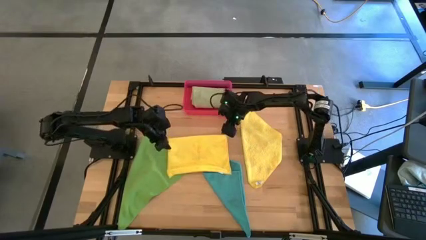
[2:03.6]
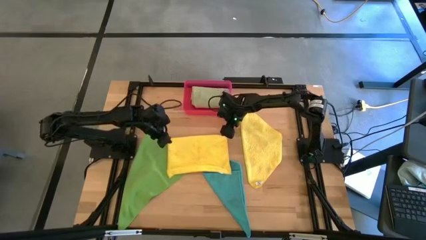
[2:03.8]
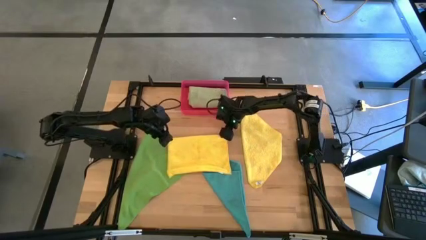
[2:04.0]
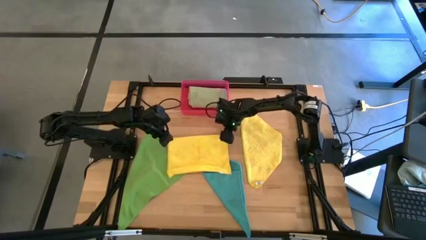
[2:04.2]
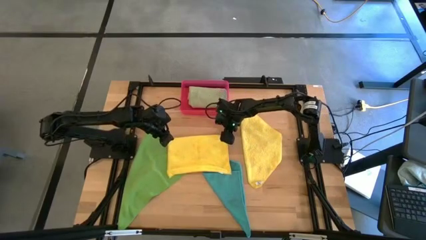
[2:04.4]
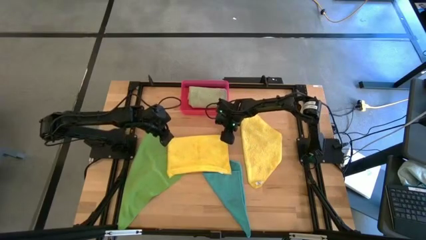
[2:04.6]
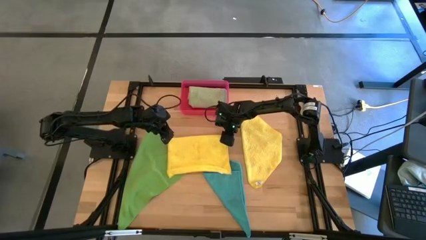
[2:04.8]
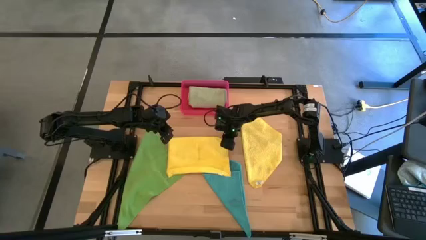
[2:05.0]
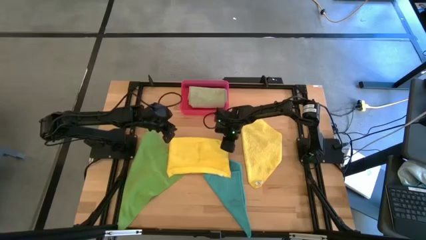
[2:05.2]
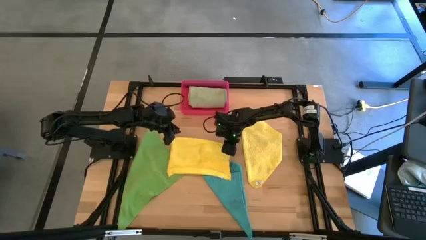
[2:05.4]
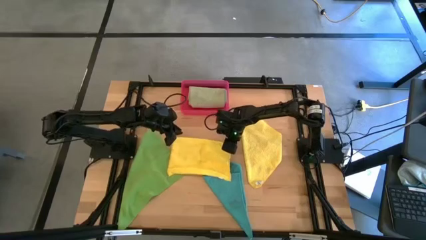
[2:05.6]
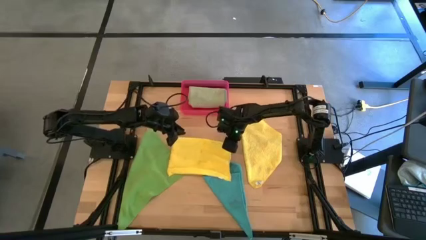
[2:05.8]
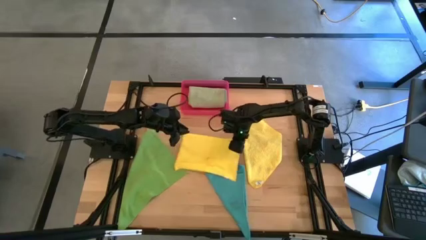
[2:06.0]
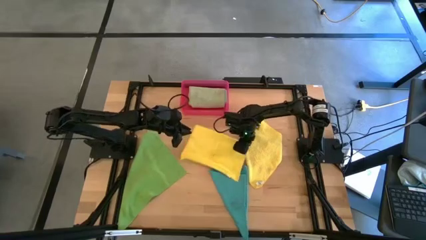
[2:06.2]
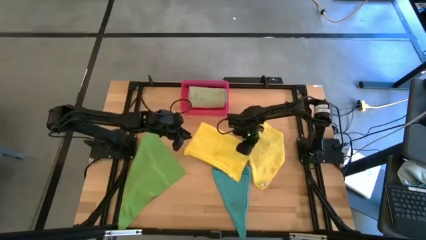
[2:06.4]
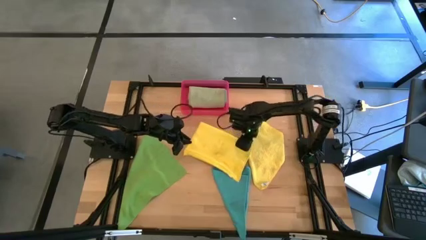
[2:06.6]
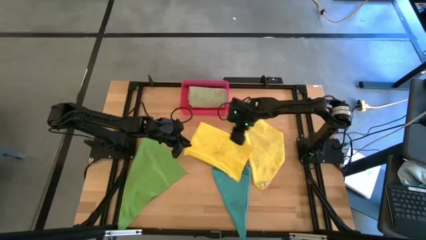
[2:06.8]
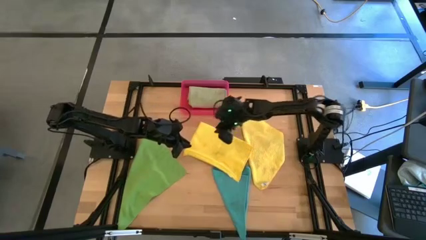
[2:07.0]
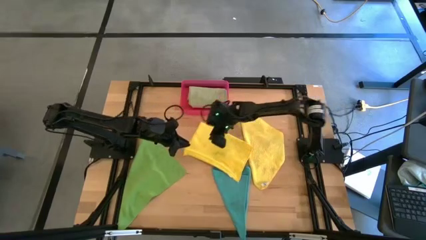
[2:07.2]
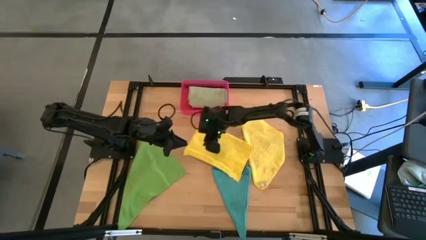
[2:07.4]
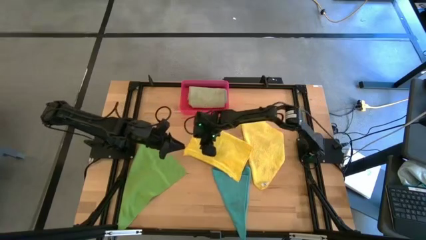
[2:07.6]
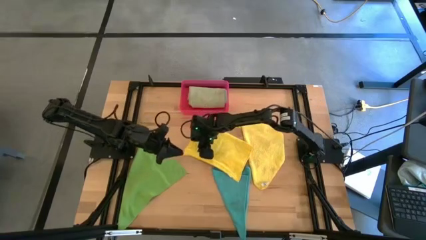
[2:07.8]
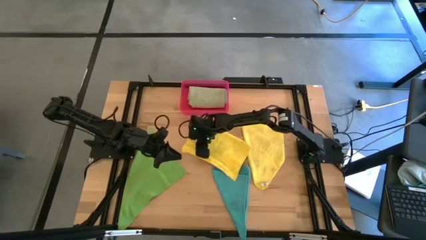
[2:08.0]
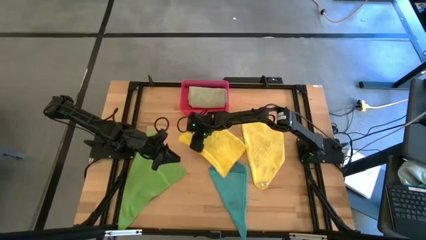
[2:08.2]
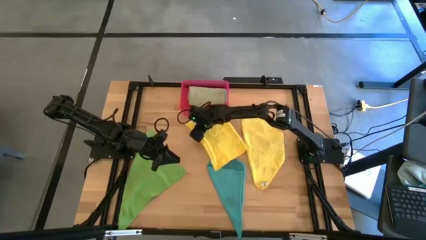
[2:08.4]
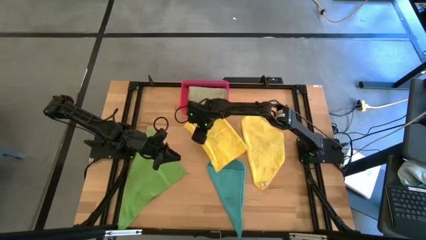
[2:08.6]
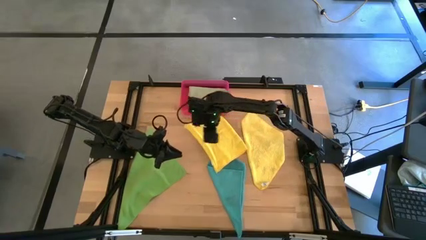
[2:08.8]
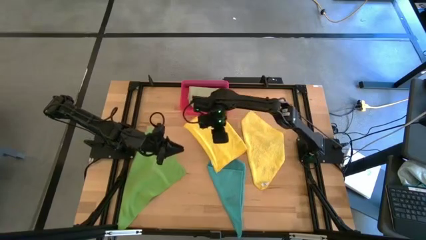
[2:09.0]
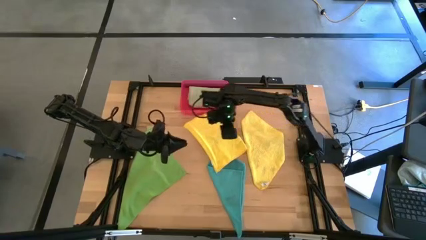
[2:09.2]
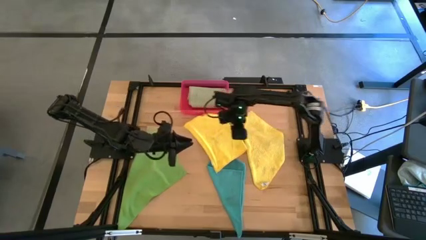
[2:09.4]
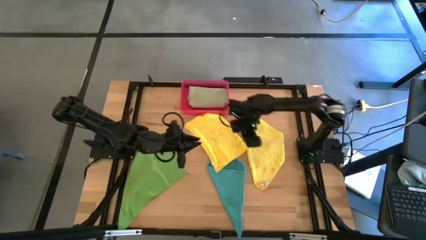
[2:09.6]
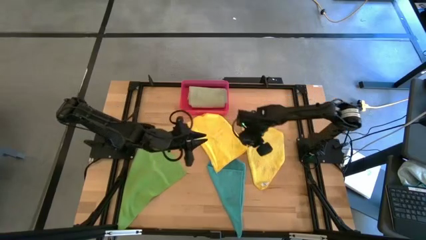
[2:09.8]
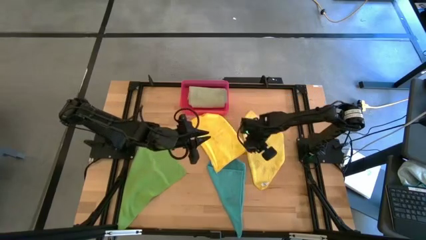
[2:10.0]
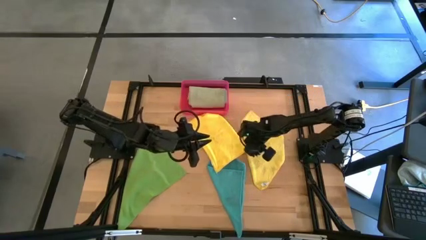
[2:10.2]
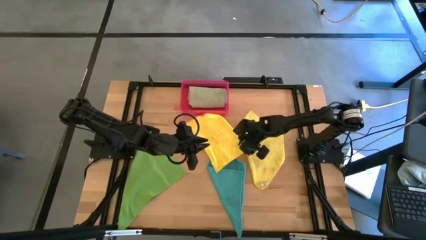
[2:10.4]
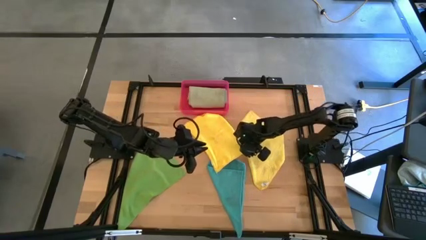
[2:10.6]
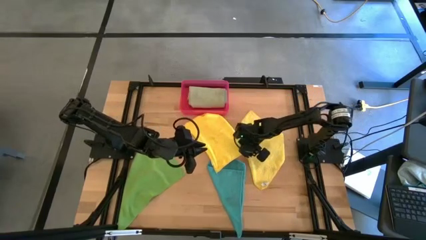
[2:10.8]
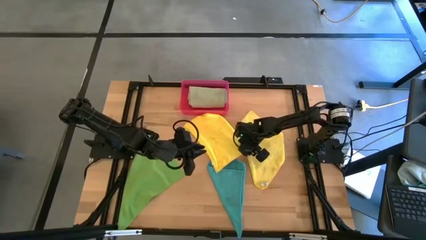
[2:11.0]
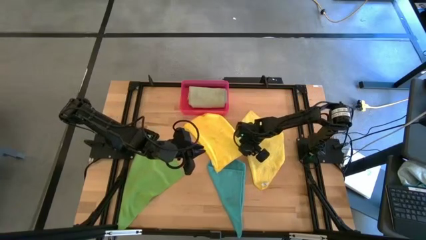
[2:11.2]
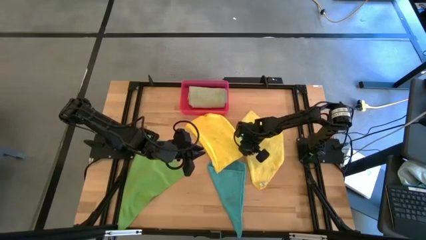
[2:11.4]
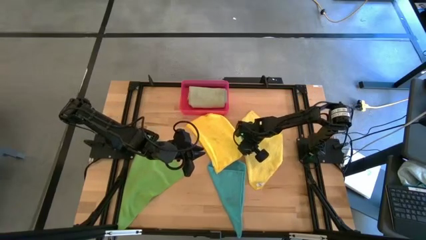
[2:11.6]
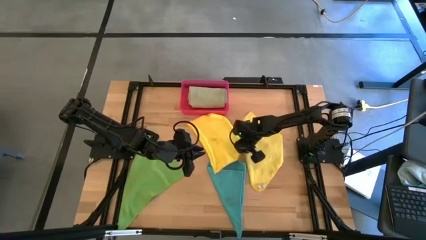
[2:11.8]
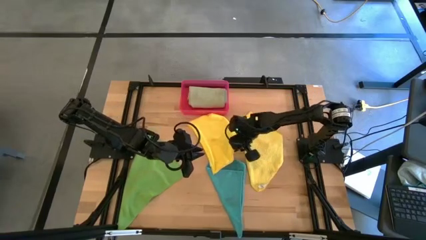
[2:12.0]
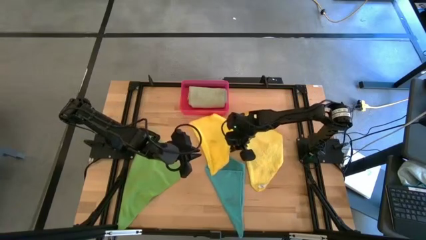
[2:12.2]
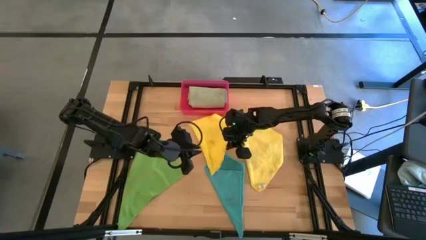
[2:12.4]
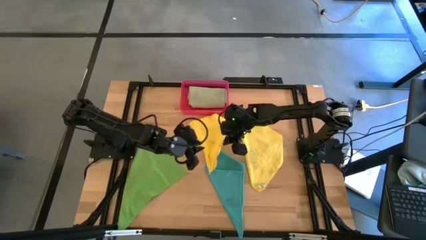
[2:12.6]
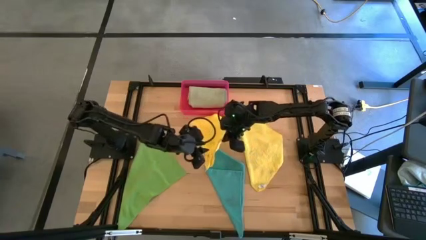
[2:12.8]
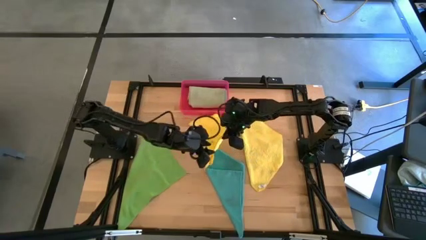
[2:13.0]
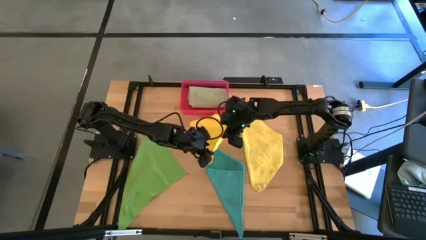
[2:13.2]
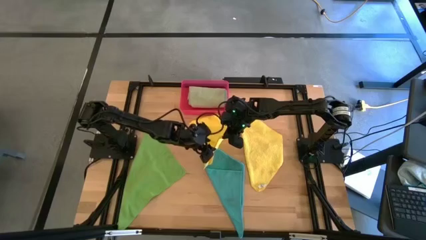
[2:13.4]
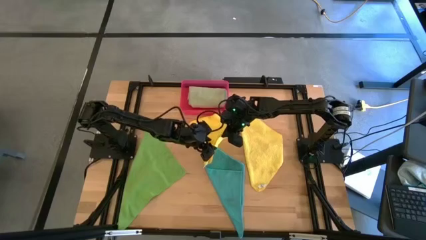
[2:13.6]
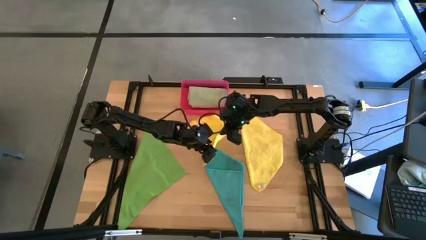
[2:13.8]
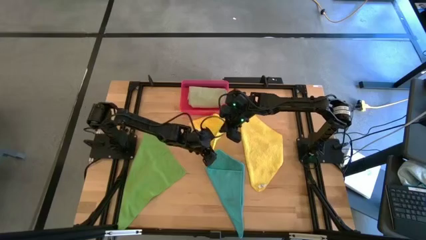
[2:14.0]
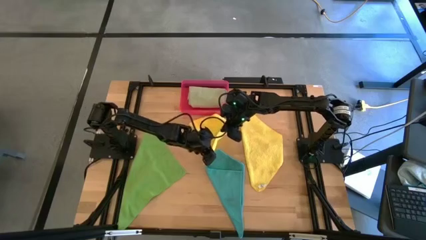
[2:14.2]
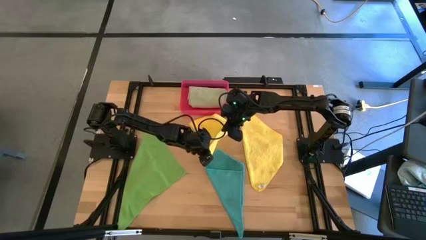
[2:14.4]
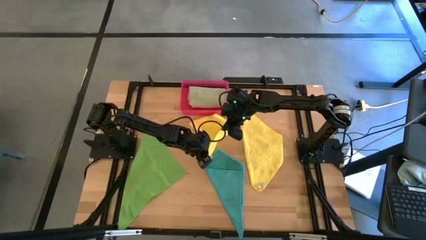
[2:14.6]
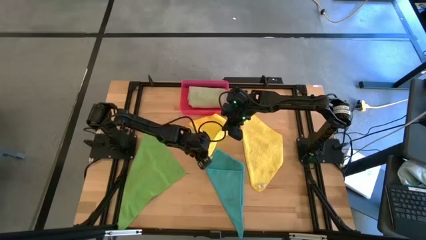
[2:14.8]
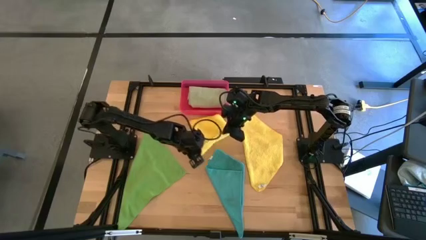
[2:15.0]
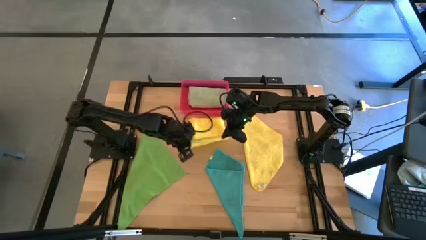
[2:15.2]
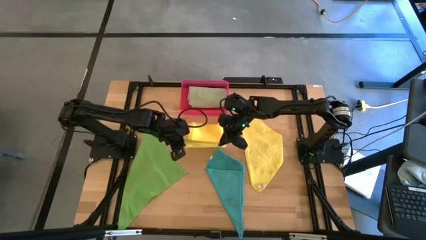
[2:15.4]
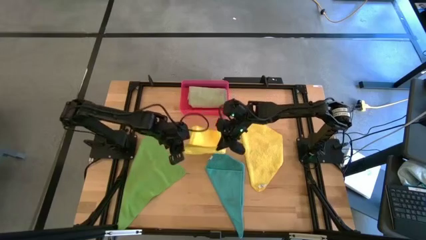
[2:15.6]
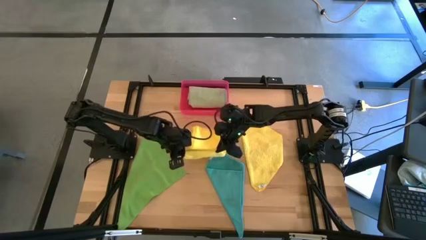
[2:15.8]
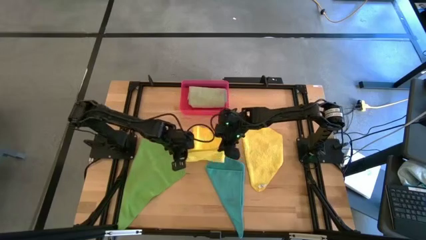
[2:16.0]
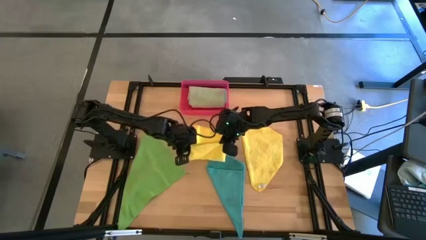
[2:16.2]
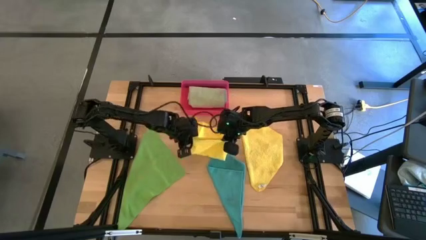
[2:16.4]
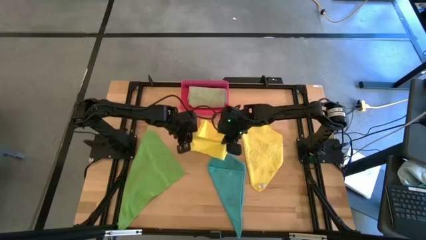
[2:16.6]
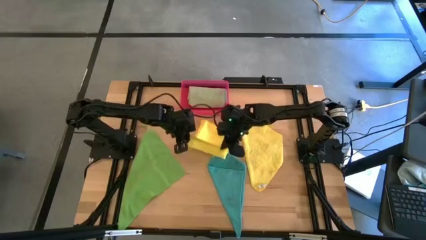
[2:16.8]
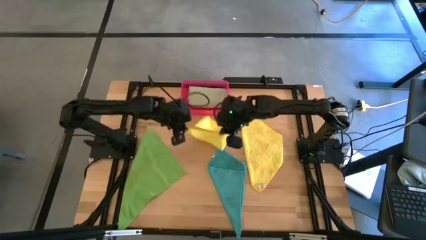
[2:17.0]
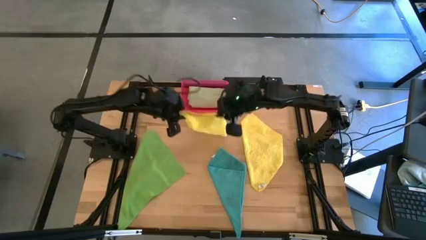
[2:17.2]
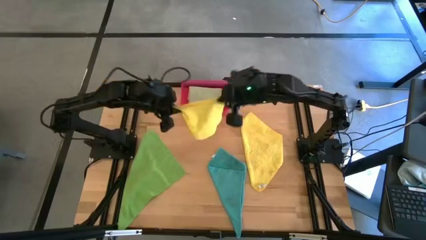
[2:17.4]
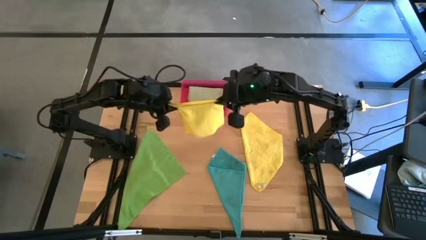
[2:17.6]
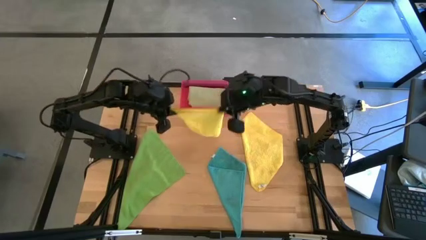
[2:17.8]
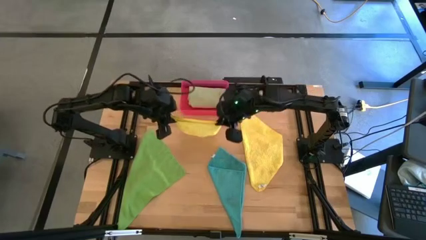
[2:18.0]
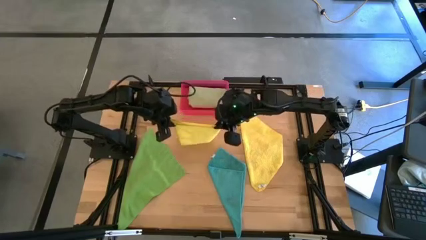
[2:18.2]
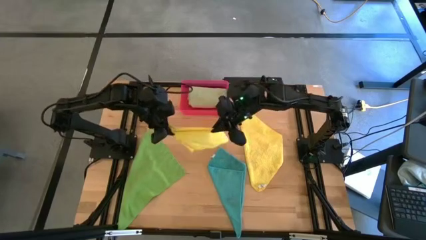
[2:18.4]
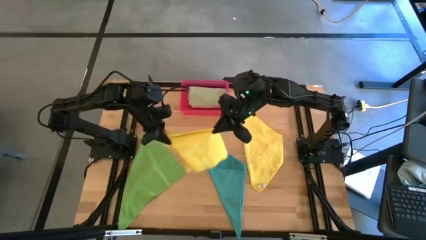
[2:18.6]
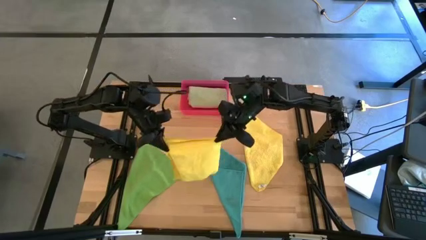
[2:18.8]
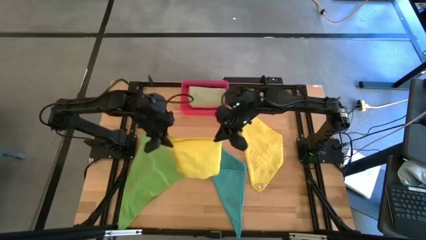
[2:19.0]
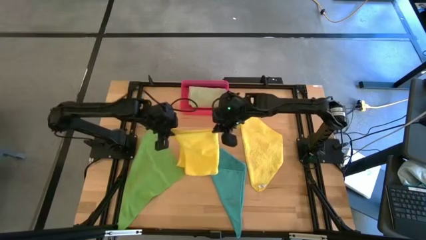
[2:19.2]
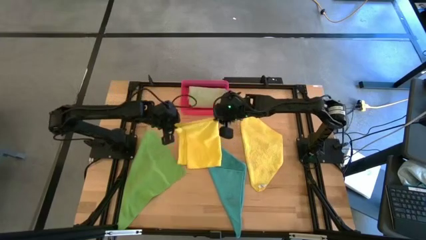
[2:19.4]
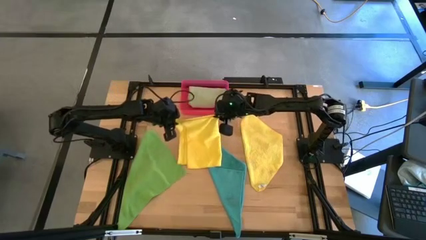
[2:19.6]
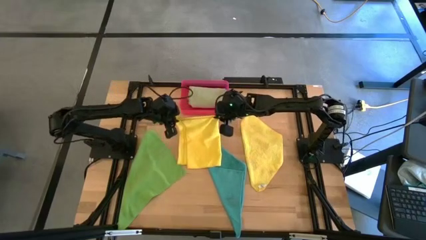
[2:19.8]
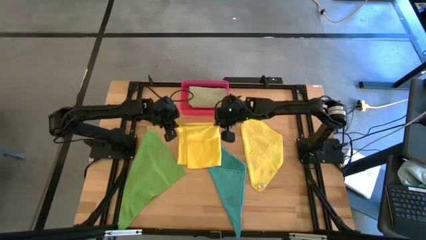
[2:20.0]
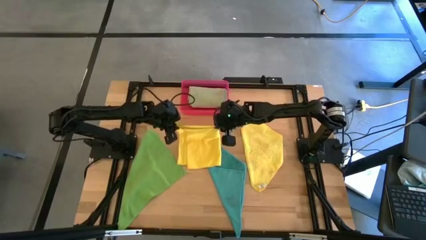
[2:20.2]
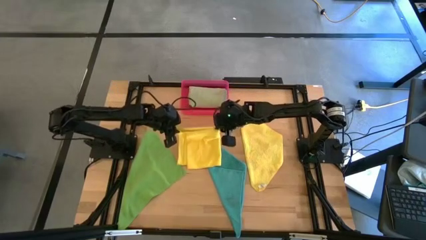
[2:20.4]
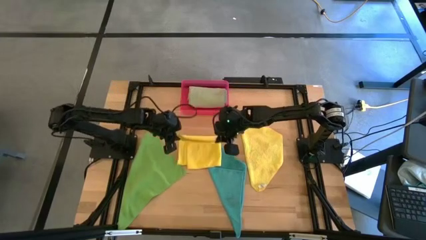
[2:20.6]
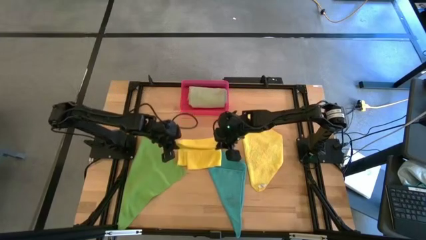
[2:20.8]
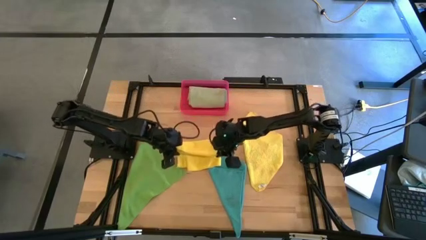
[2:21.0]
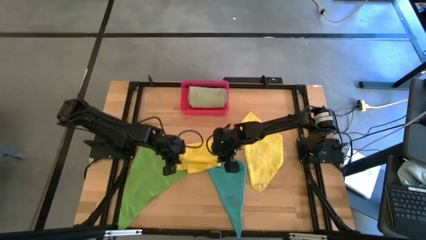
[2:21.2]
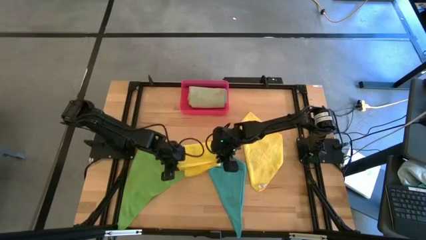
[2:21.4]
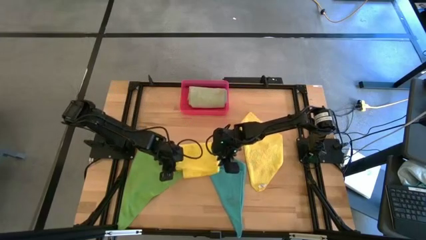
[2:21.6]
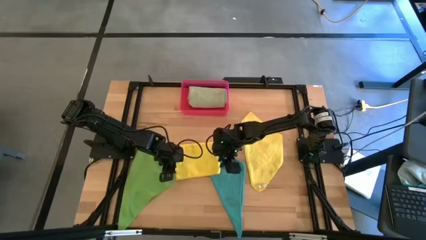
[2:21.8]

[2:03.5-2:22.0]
Task: Fold microfiber towels
Fold the left yellow microfiber cloth
